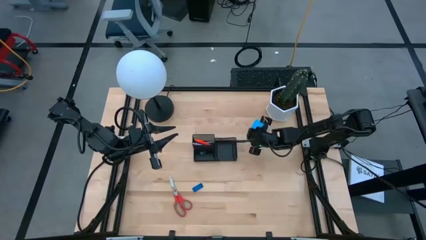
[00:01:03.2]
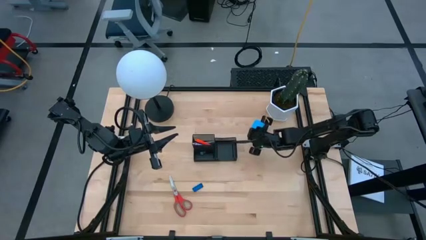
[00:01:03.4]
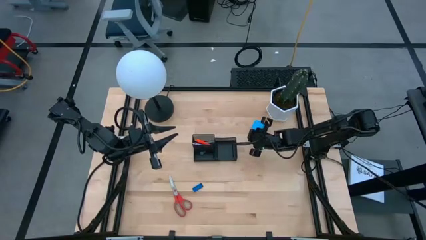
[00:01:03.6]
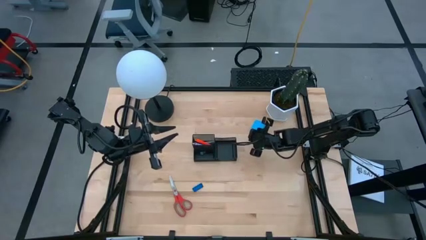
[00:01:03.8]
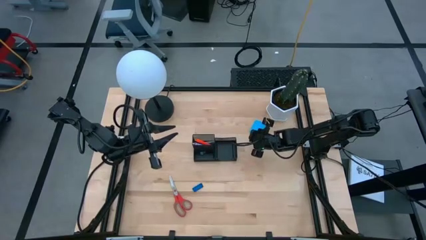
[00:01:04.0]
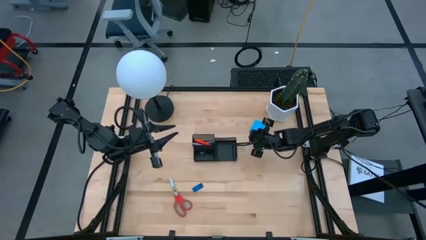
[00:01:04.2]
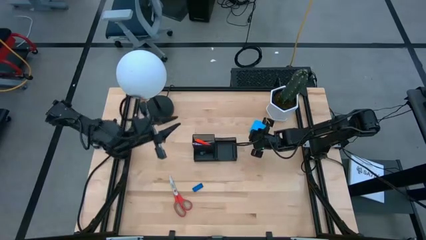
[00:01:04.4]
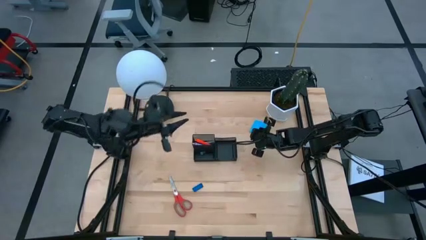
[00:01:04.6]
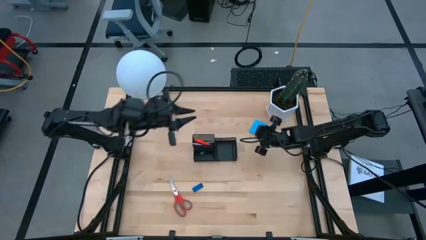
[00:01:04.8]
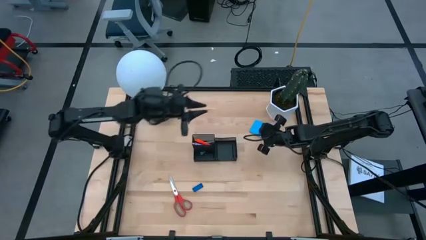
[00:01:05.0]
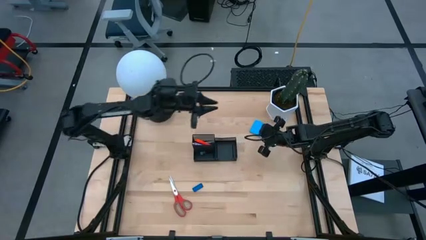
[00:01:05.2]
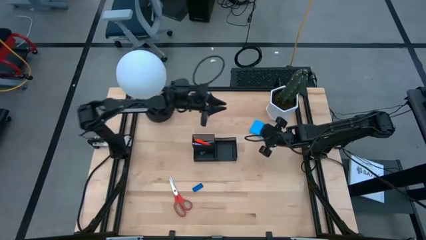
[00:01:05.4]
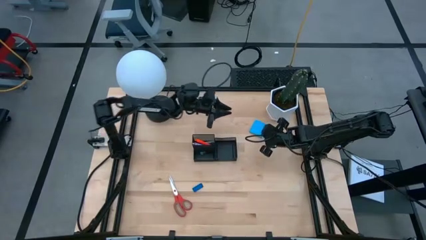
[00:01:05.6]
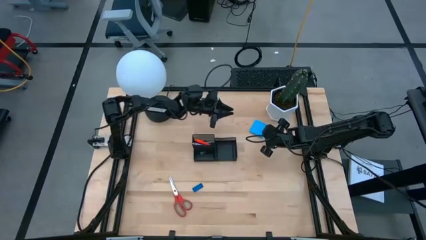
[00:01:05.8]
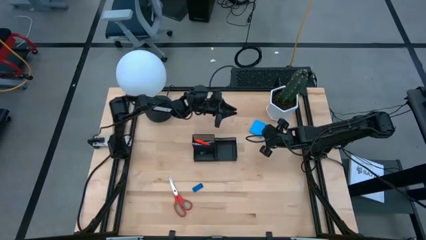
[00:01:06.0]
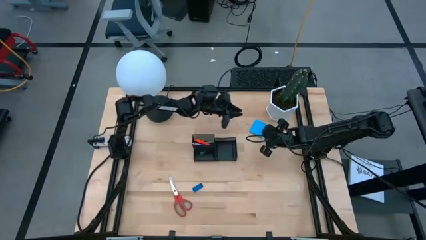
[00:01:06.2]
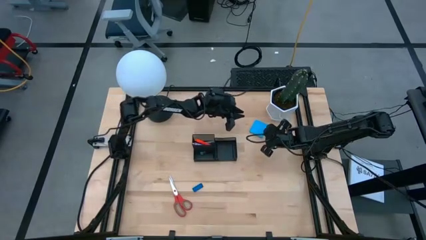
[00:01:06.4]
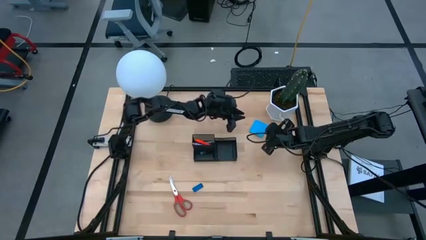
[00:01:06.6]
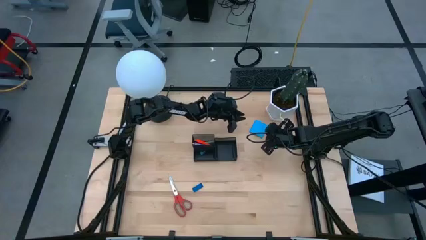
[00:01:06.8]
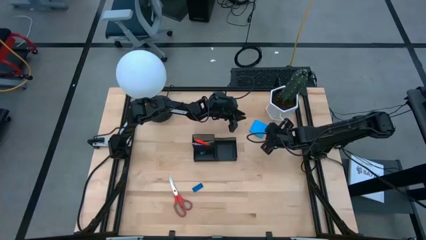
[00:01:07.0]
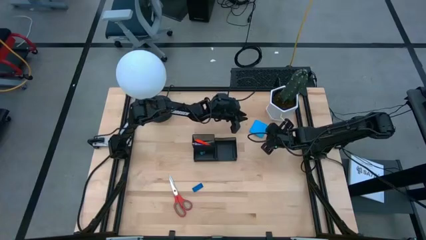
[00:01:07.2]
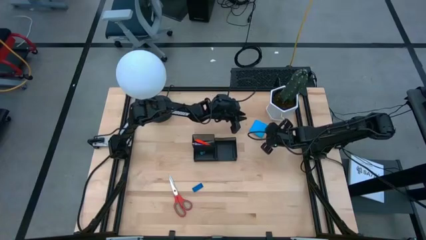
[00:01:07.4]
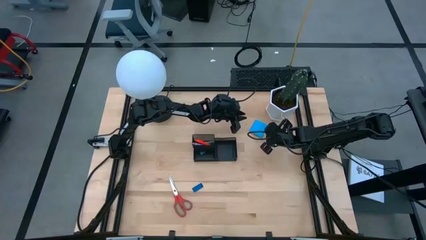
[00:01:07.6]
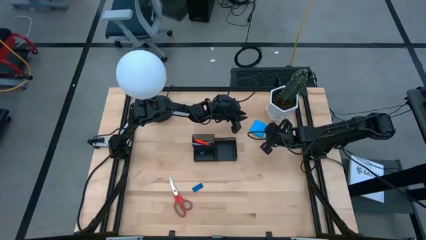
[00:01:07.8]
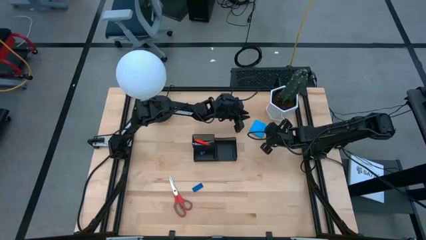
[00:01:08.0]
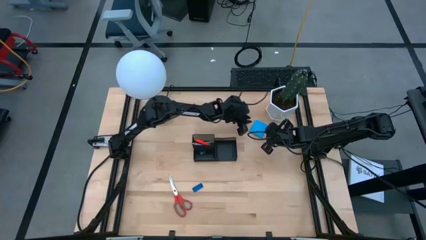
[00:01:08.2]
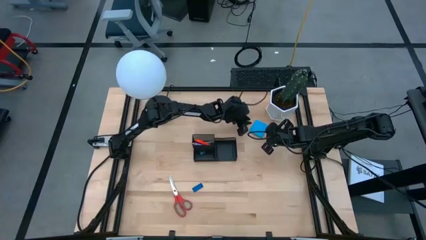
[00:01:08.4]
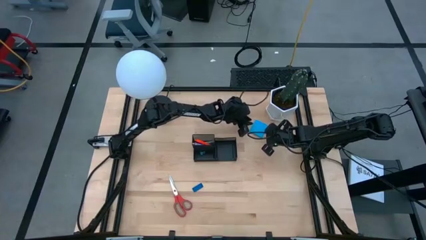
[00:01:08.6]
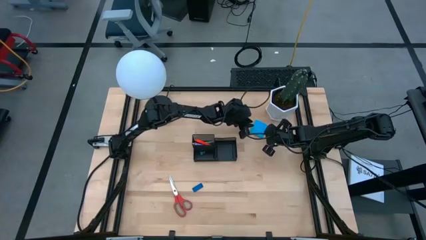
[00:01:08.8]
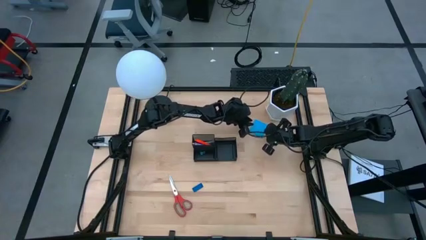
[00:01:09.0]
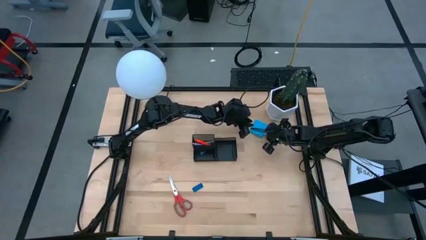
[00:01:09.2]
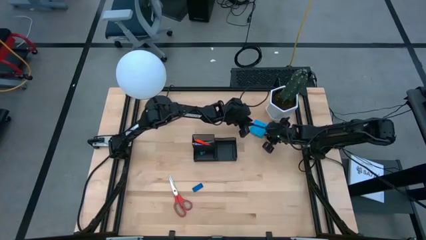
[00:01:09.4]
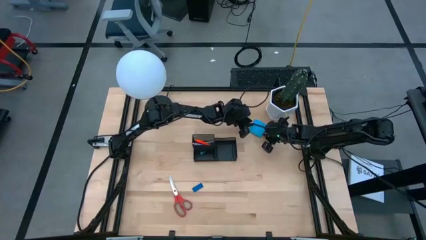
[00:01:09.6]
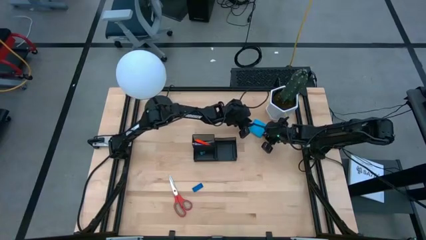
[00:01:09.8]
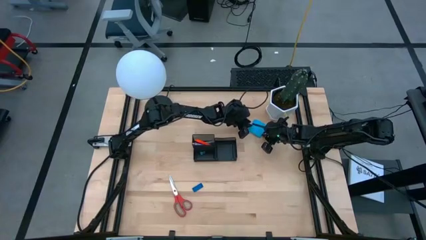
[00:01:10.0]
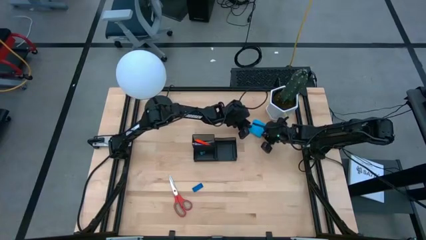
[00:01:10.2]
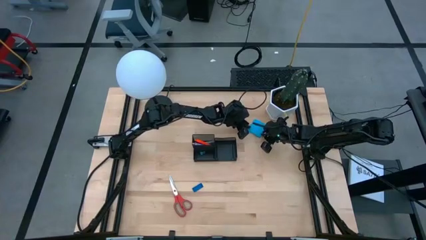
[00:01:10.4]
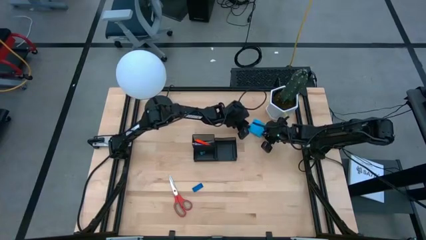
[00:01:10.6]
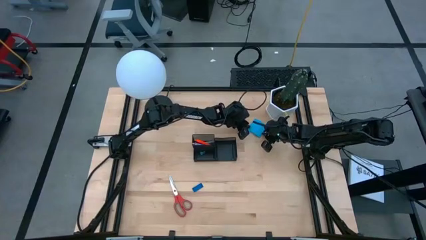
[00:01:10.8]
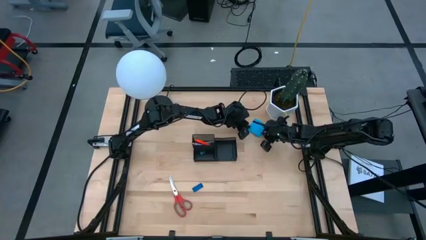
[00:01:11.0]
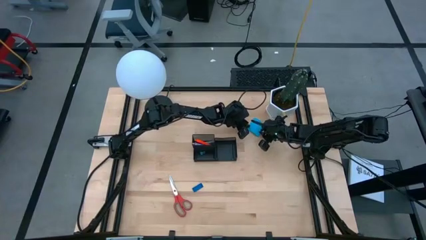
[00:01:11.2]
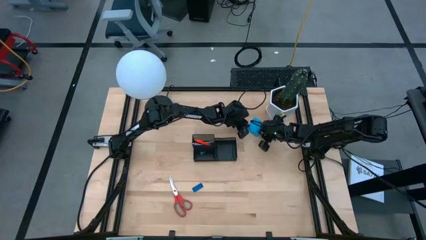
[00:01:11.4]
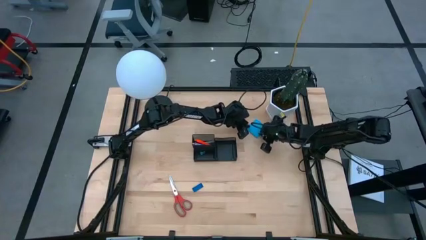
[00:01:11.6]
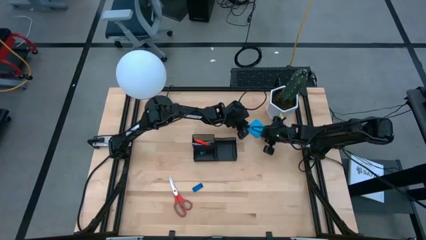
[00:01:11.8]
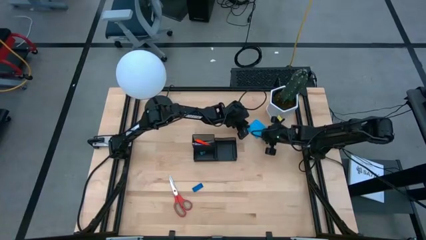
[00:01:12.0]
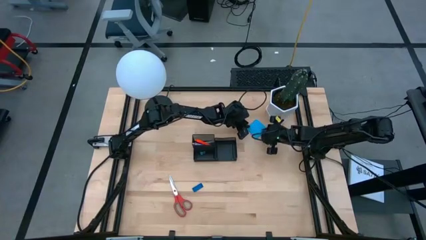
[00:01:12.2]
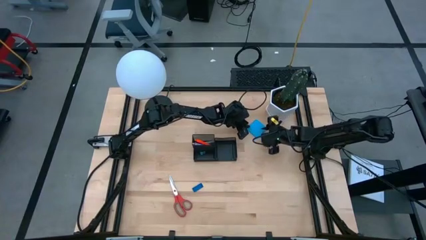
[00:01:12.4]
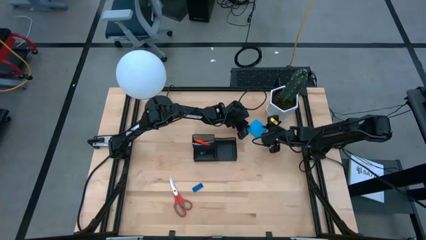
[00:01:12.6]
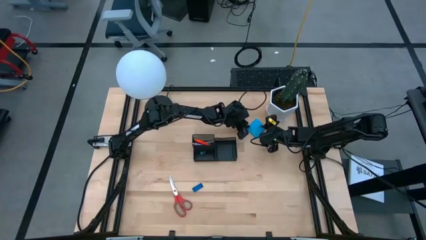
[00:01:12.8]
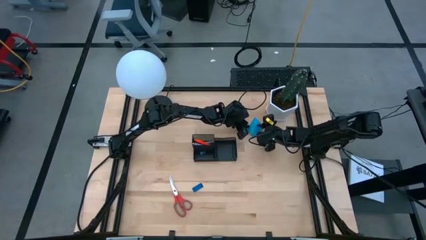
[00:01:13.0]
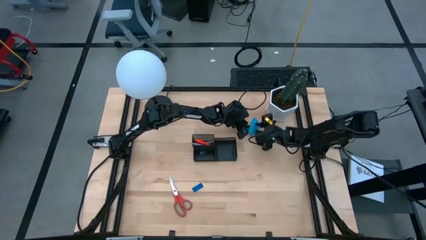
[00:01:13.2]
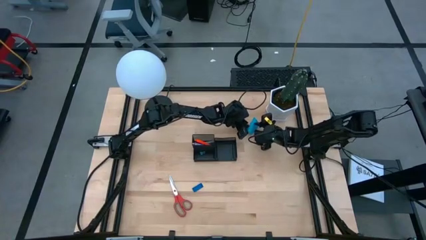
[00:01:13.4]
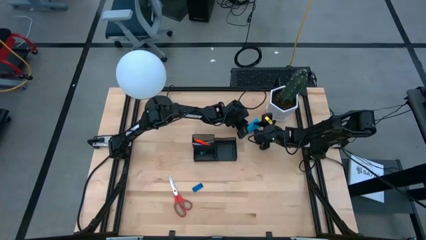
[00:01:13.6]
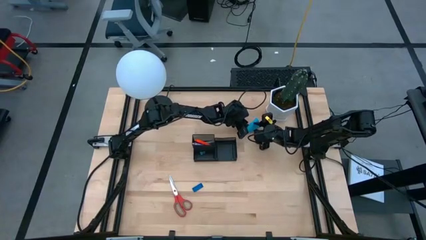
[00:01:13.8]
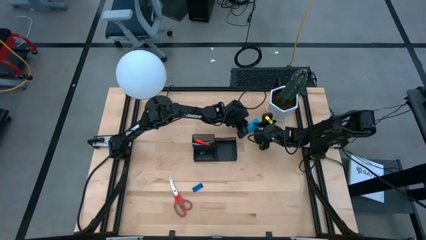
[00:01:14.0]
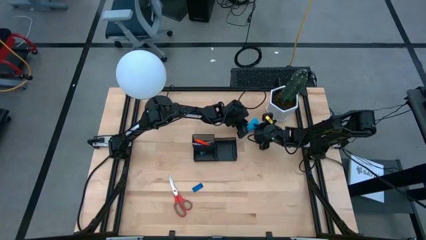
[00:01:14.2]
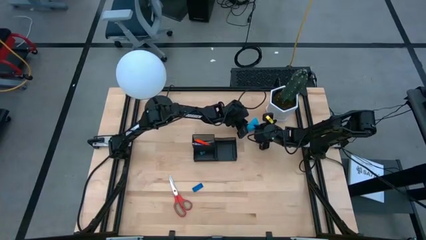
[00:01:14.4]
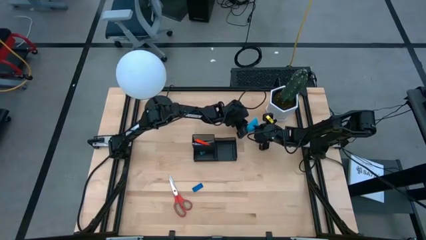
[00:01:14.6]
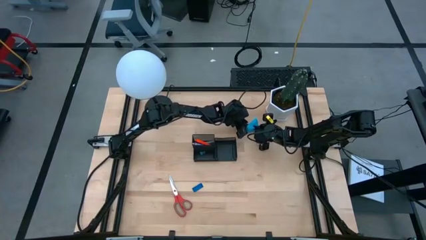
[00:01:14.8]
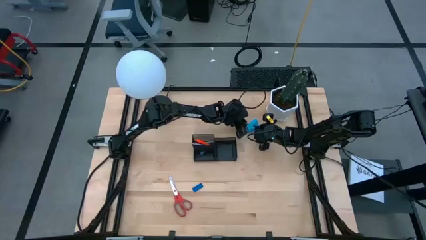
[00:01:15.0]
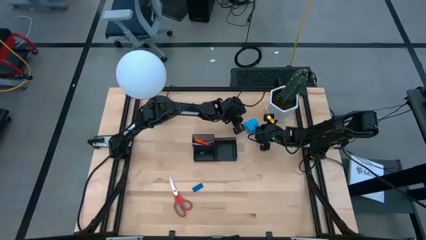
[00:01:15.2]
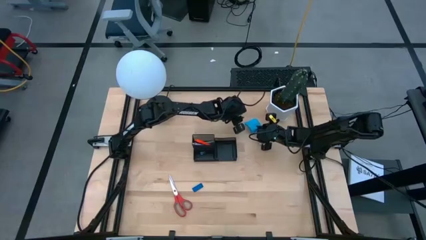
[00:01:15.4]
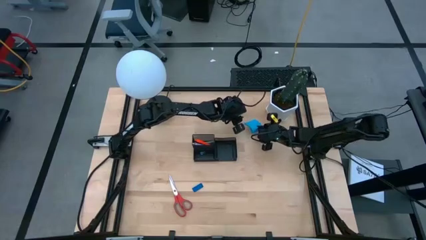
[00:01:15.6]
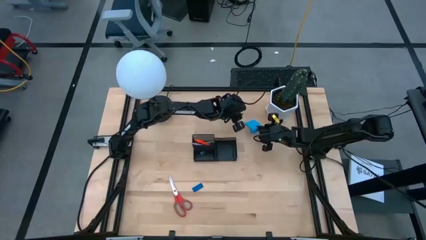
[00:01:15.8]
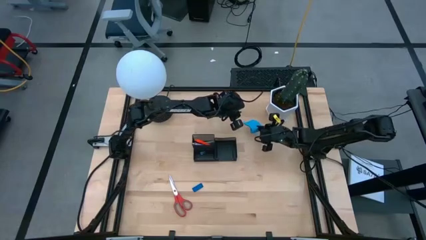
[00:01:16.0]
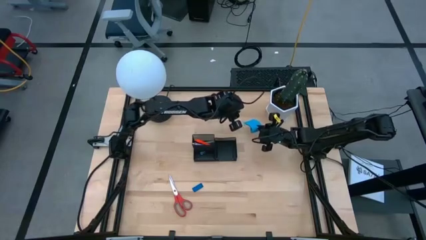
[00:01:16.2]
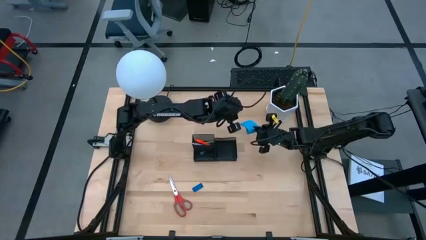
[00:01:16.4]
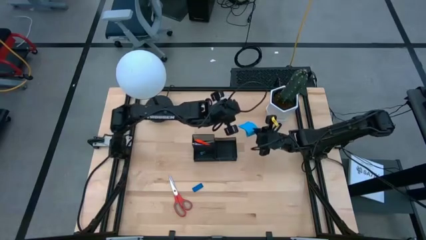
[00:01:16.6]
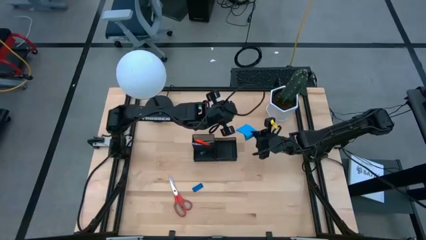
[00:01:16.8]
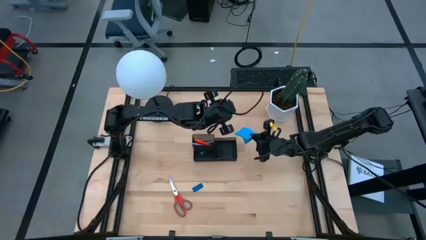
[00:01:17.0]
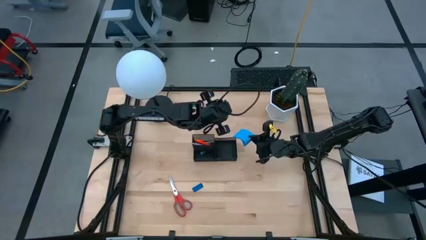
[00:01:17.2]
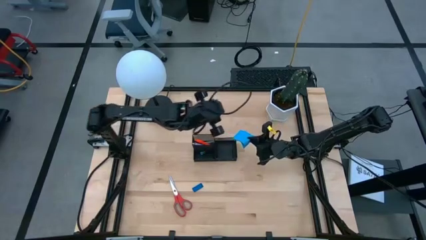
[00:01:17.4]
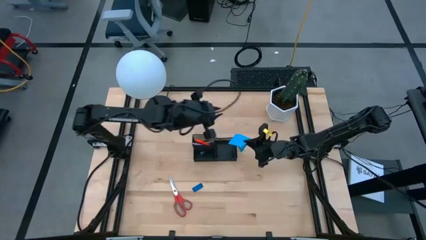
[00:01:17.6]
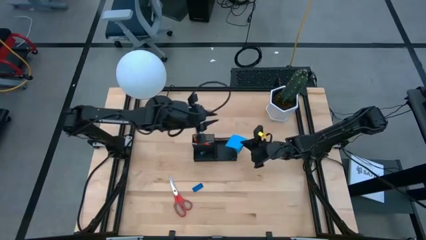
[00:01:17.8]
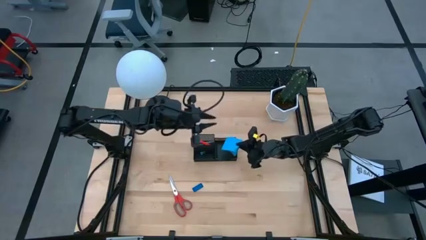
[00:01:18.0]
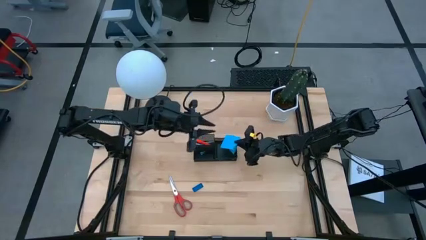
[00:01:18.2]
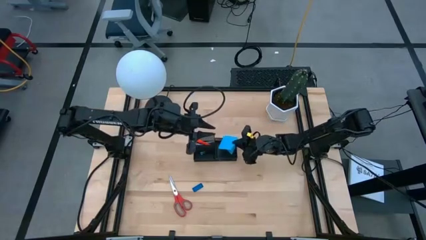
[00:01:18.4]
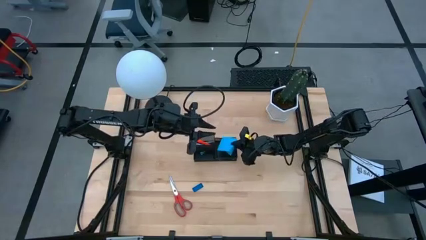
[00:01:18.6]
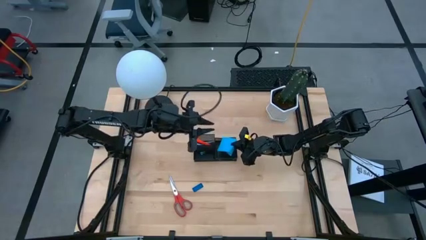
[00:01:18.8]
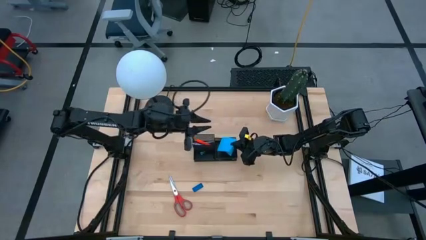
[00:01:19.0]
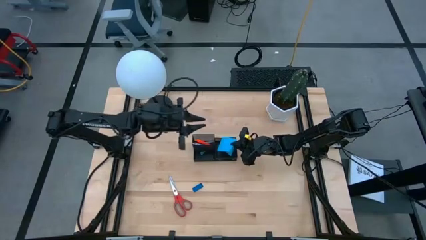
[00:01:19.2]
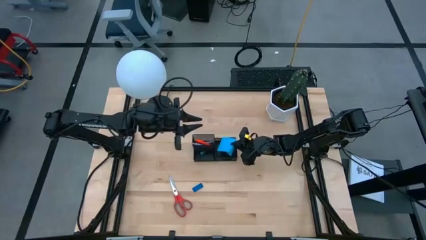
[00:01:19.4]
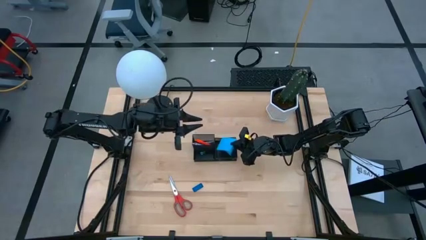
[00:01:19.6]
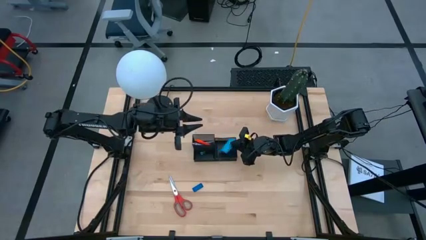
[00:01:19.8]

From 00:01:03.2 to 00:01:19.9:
Task: Pick and place office supplies into organizer
Put the blue sticky notes into the black desk organizer
